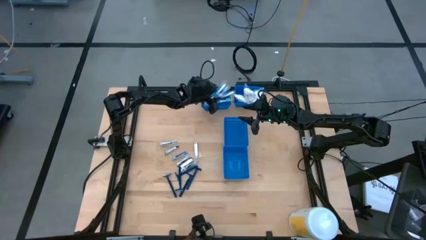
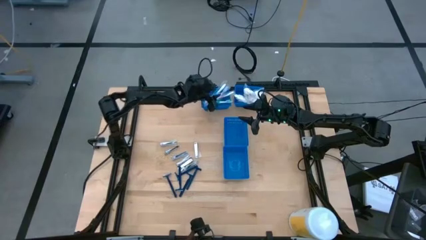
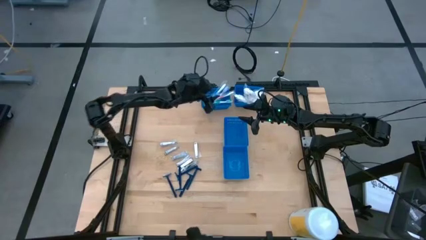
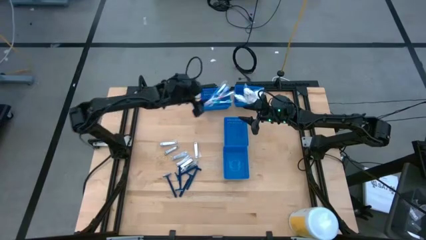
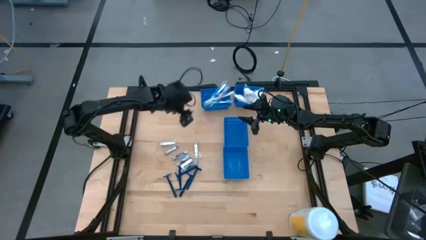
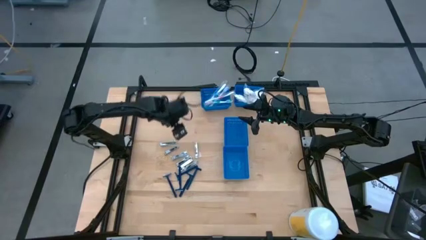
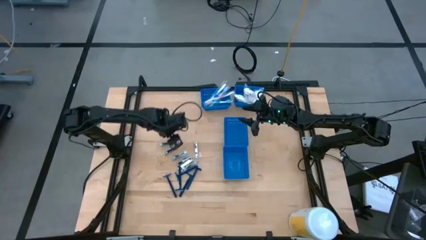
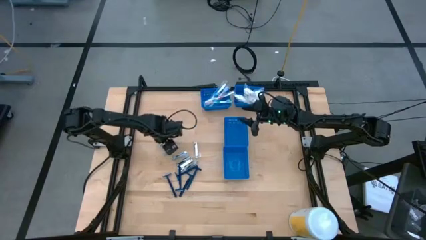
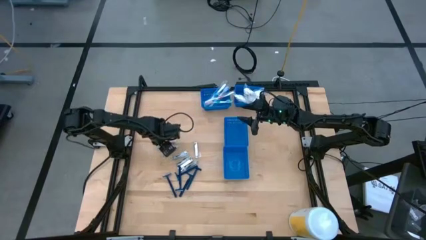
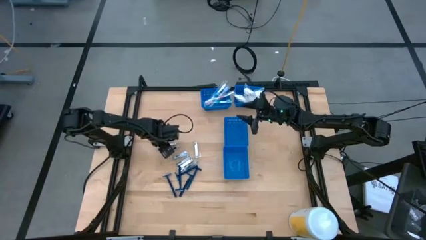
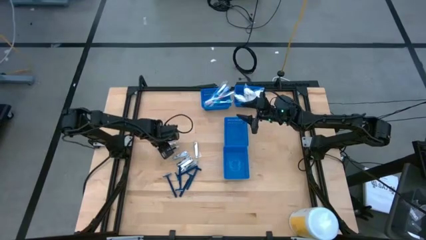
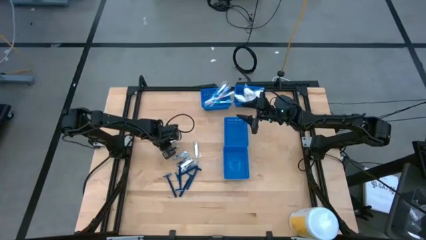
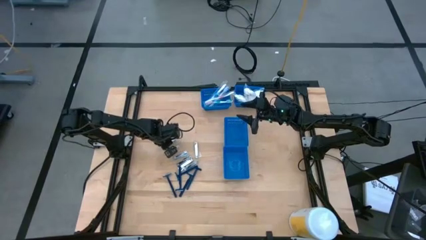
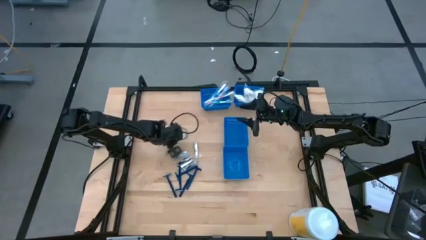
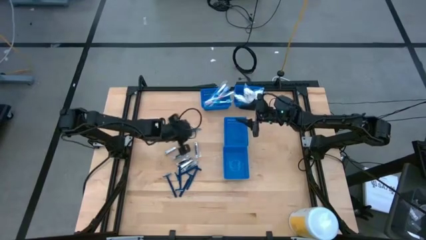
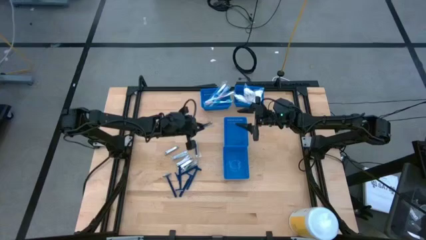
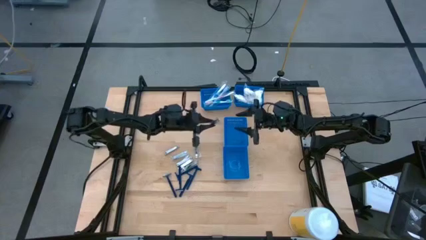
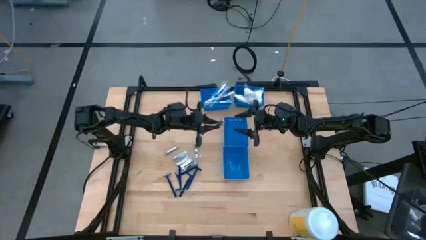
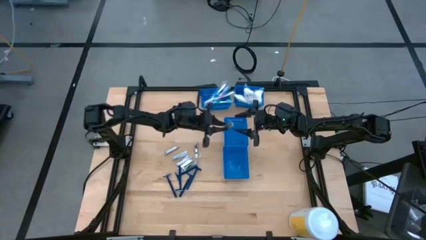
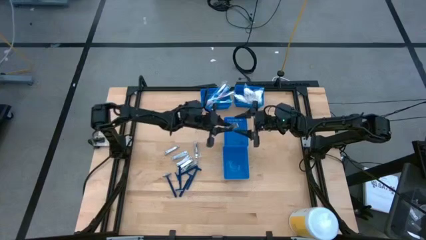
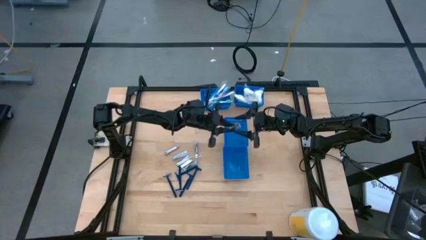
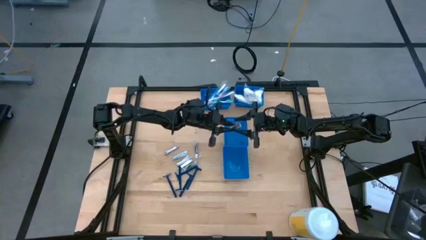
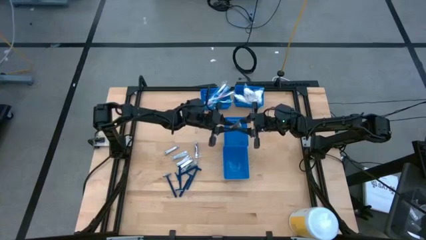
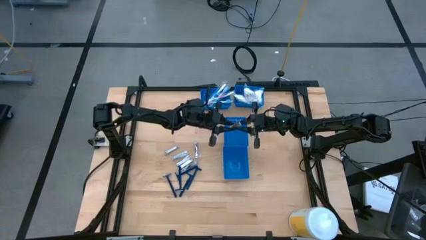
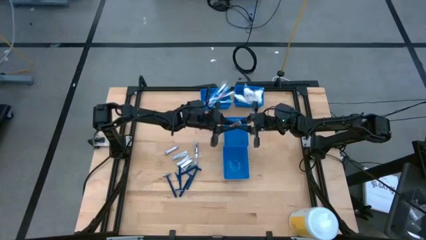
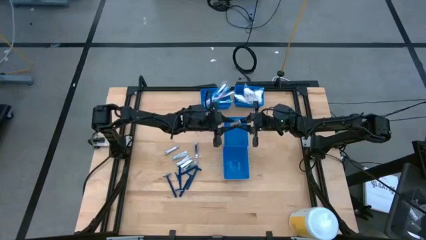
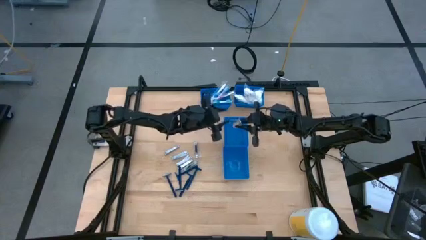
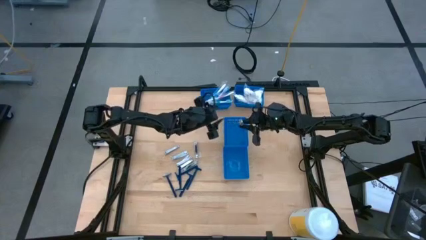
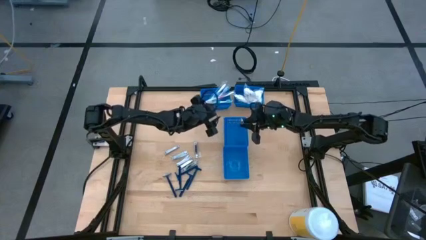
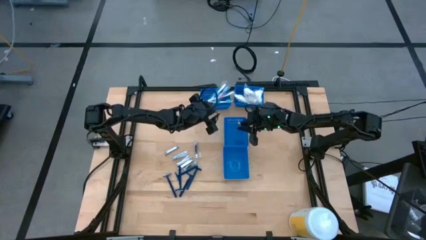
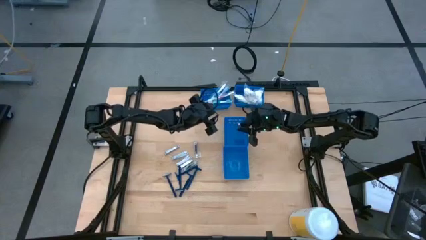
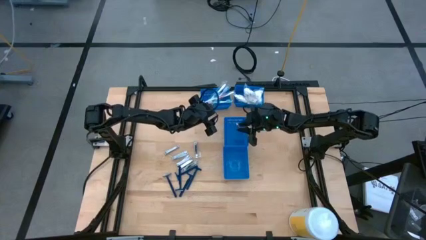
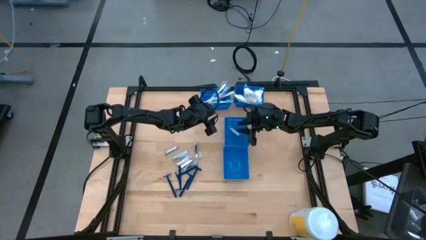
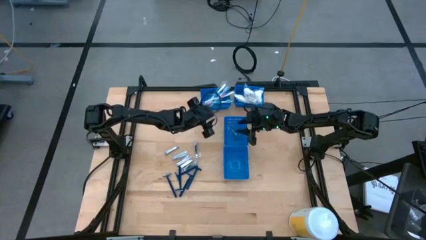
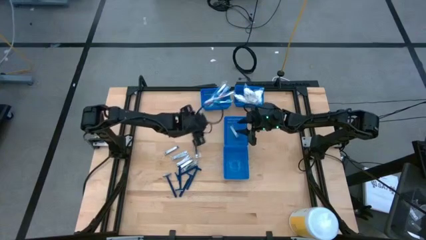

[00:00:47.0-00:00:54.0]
Task: Pick & Place Travel size toiletries
Put the nail clipper into the center blue bin

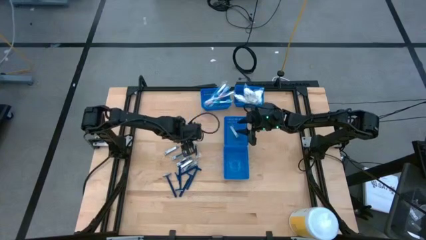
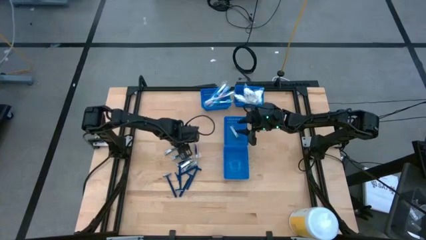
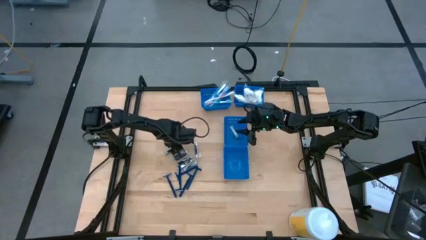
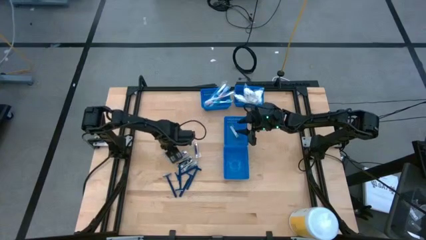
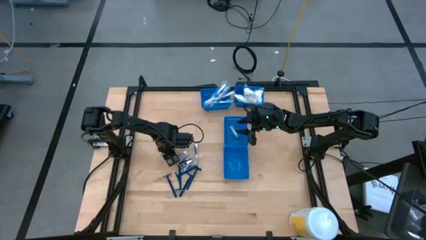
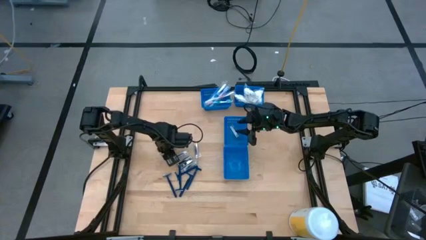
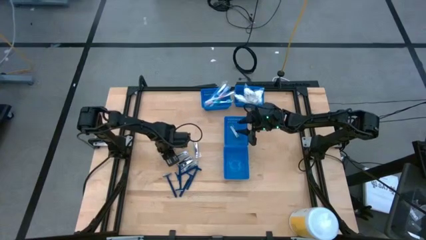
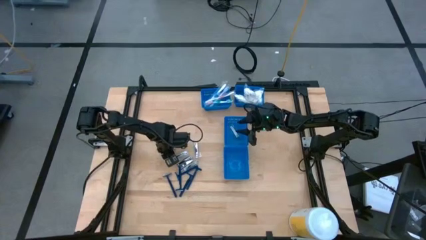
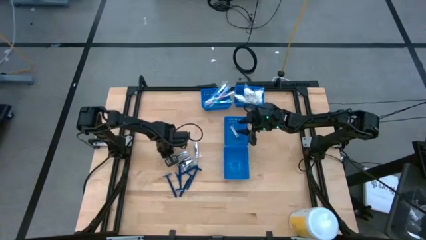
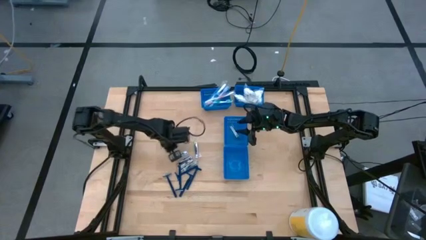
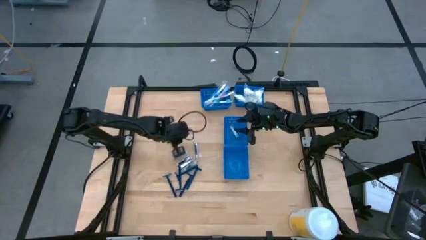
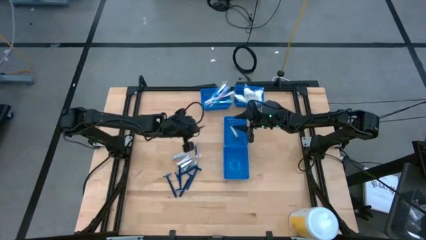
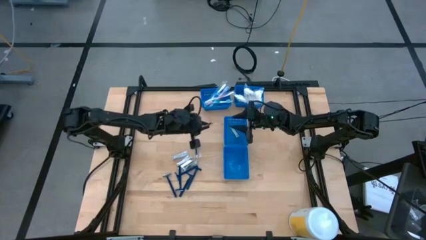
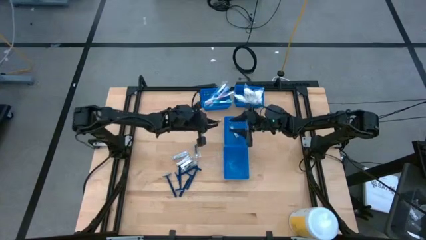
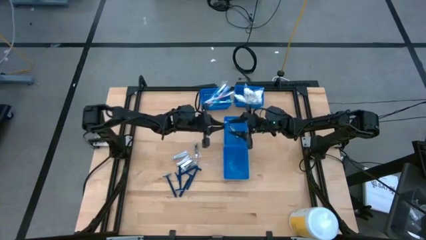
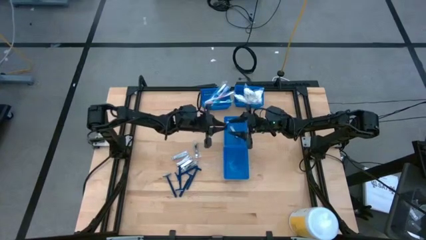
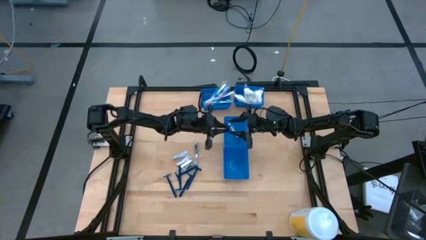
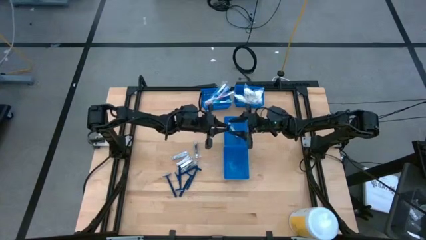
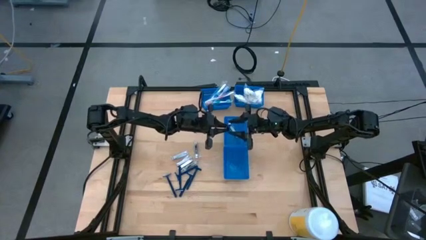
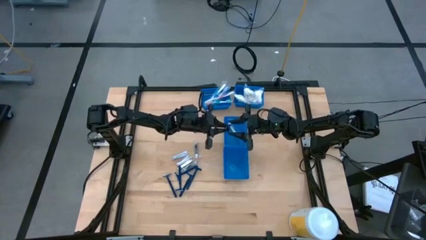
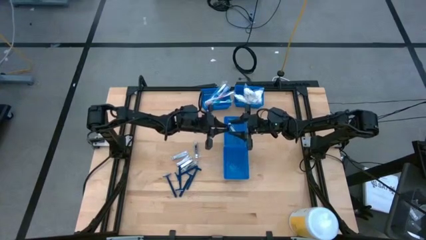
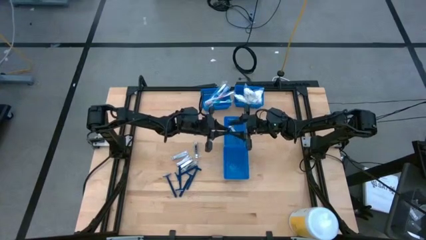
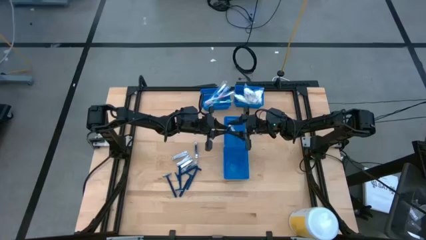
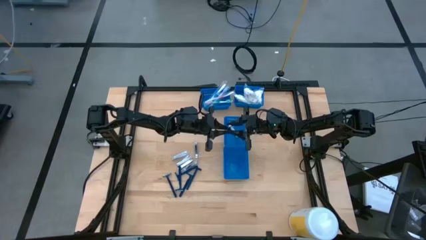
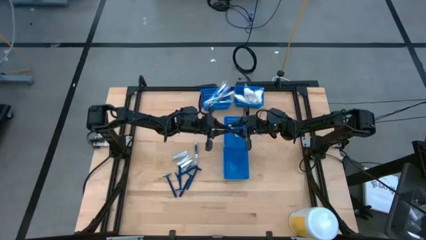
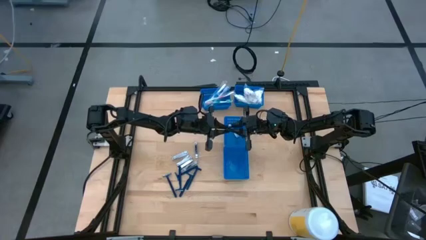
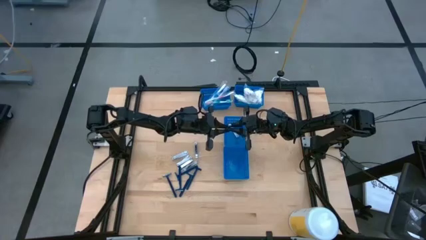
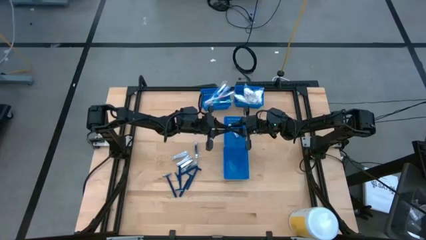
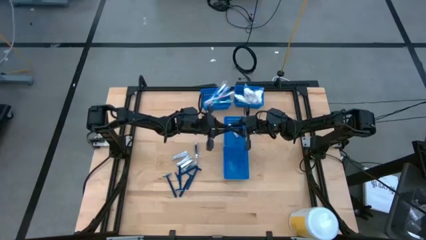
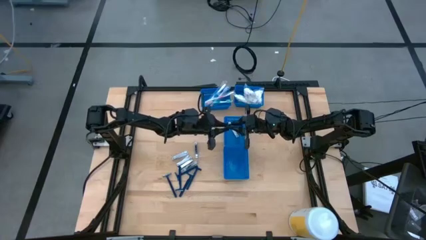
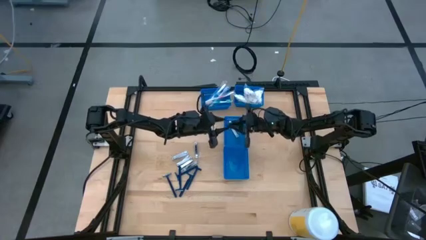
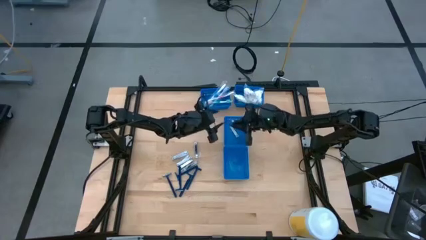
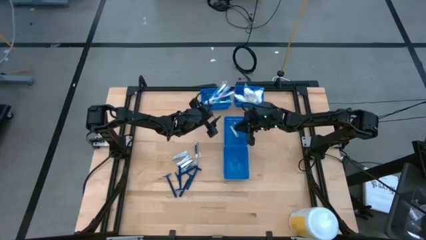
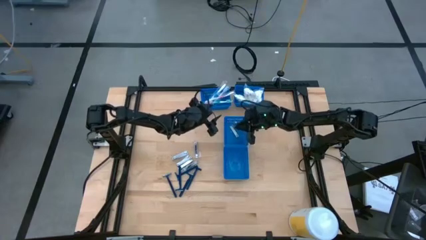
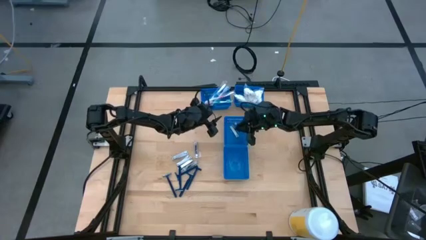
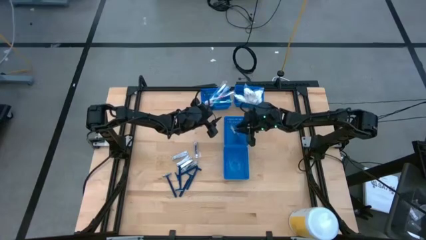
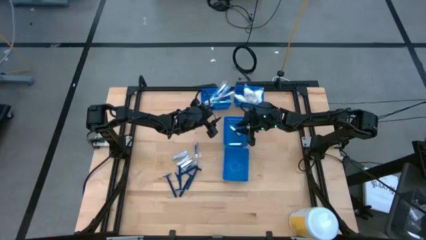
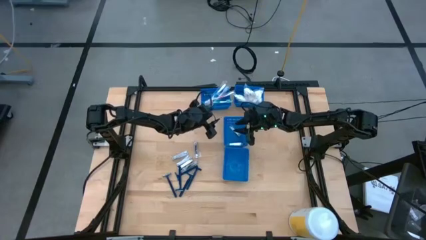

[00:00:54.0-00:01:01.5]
Put the nail clipper into the center blue bin

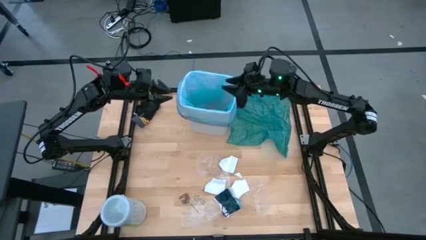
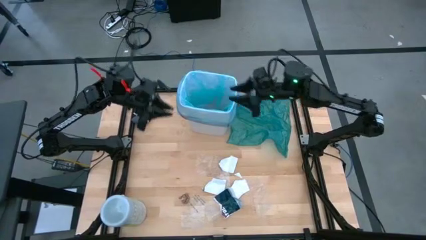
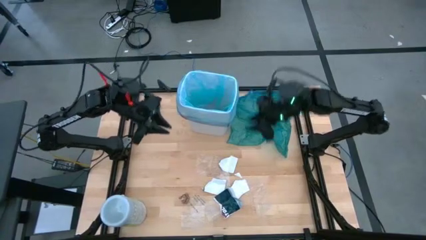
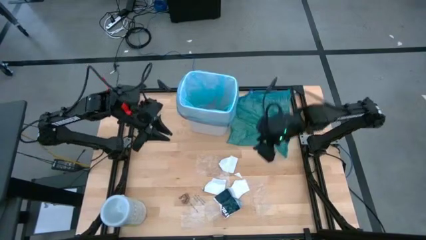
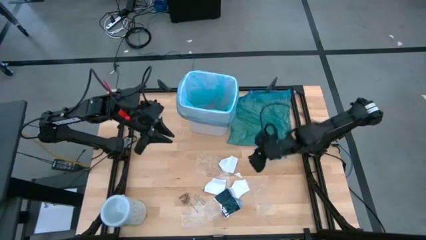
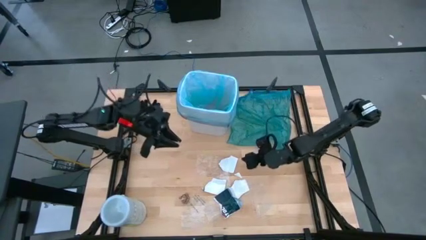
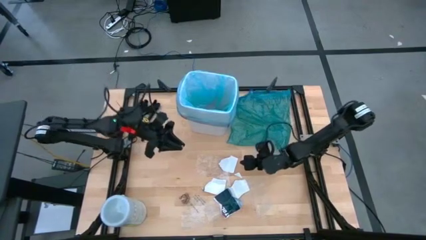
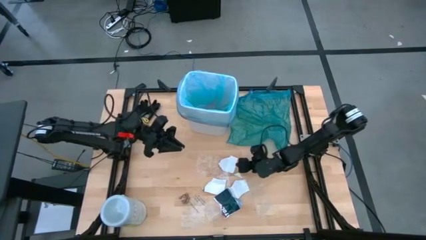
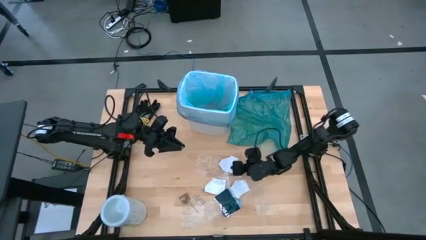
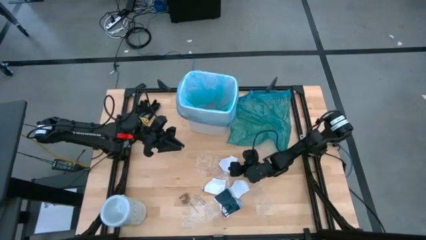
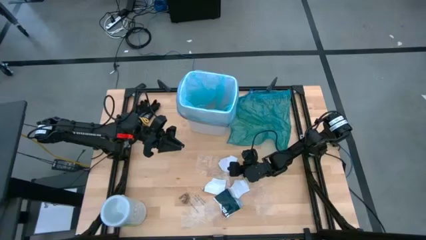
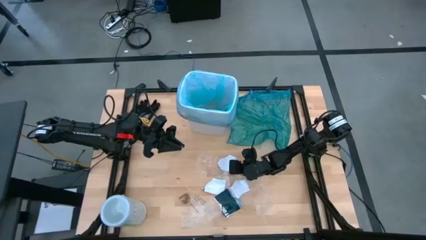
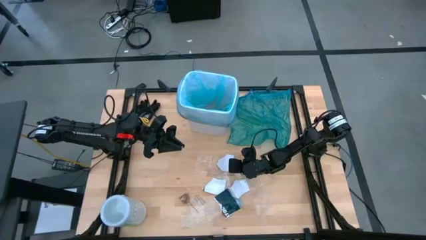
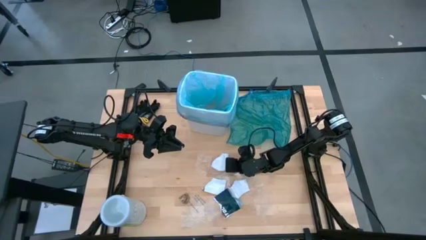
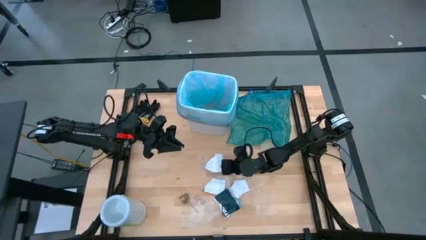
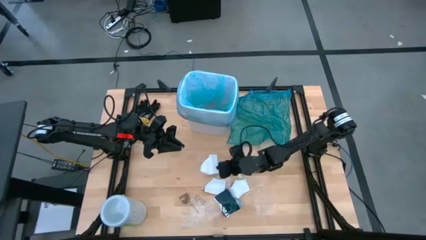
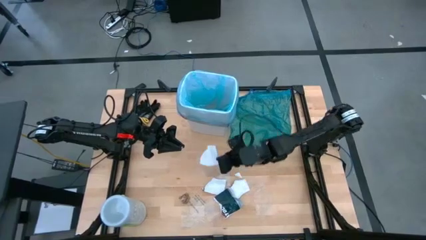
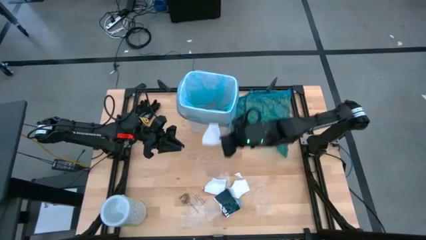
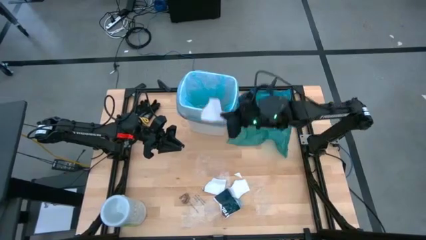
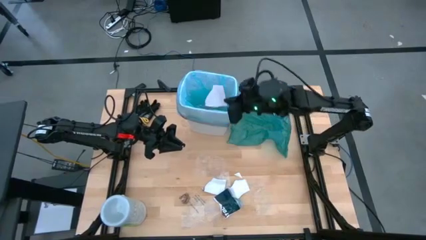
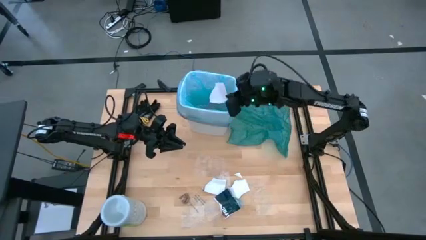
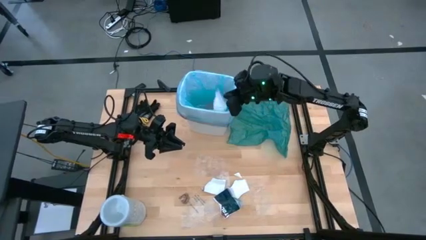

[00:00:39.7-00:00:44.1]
Task: place trash/remove bag and relplace
Put the white magazine paper into the trash bin
